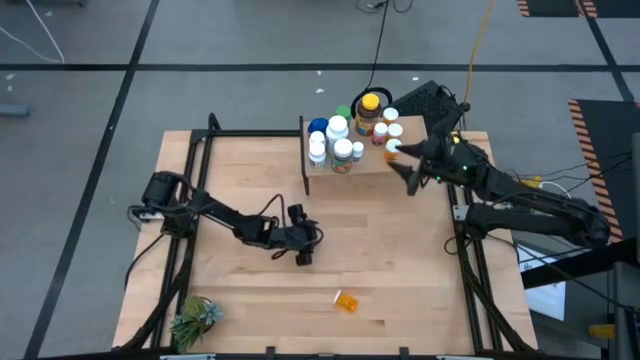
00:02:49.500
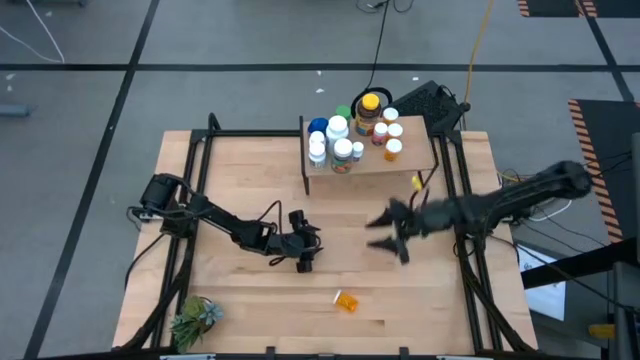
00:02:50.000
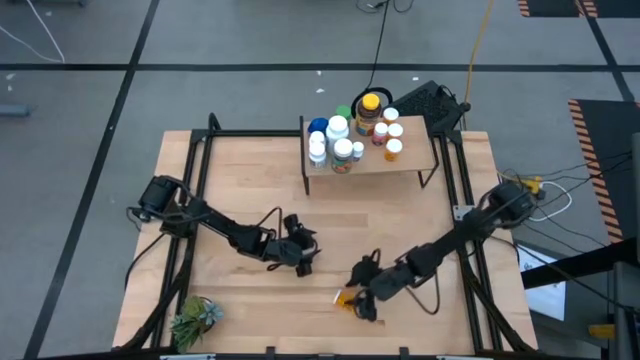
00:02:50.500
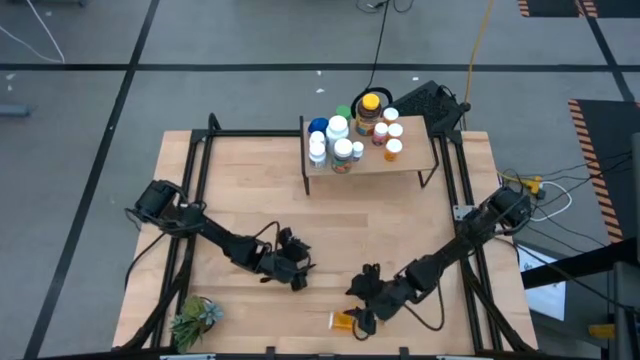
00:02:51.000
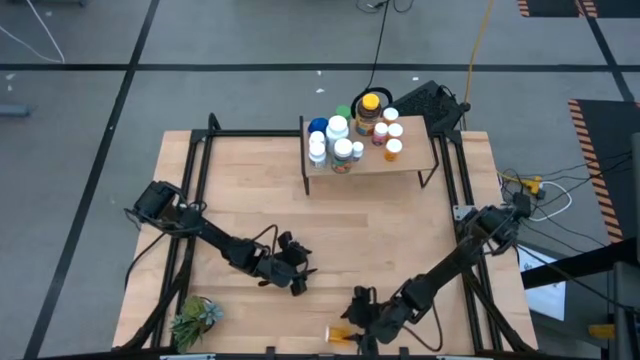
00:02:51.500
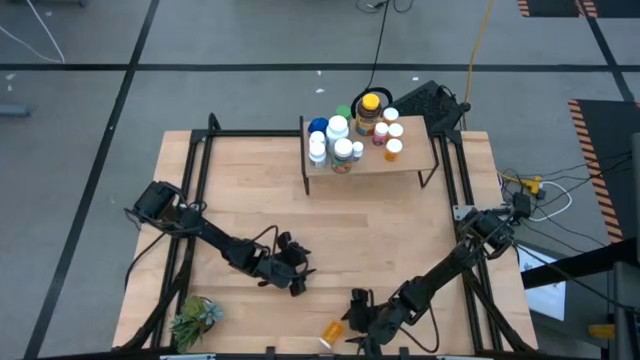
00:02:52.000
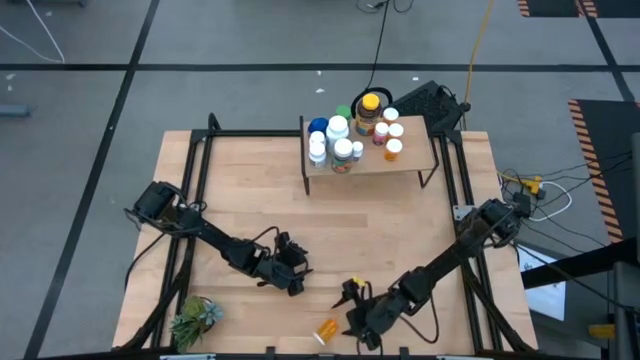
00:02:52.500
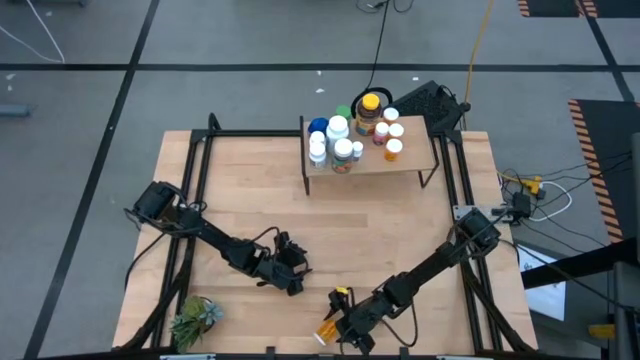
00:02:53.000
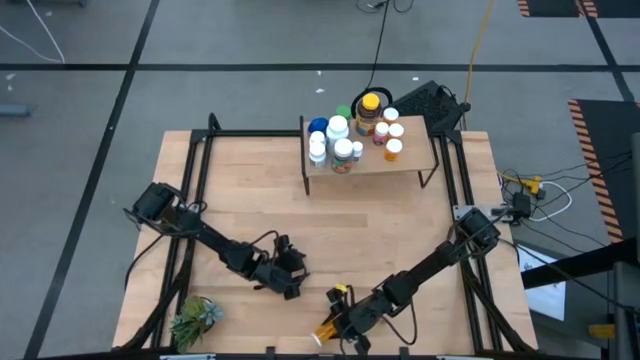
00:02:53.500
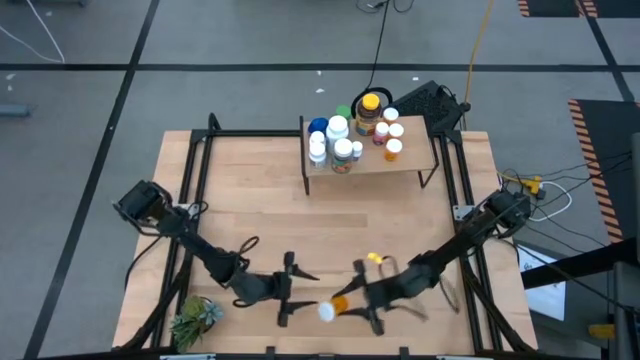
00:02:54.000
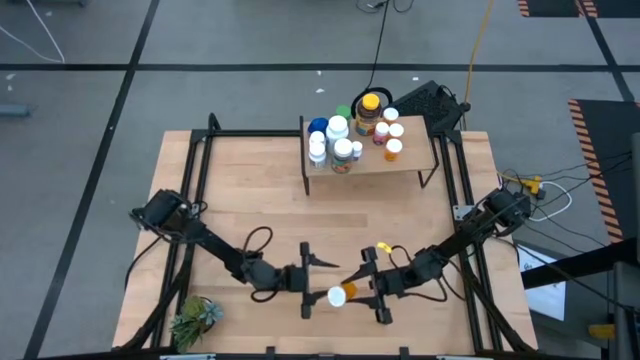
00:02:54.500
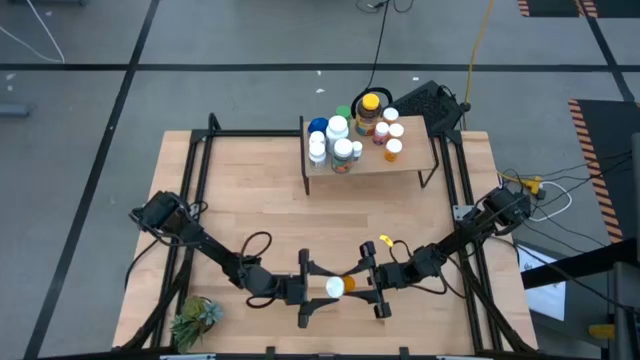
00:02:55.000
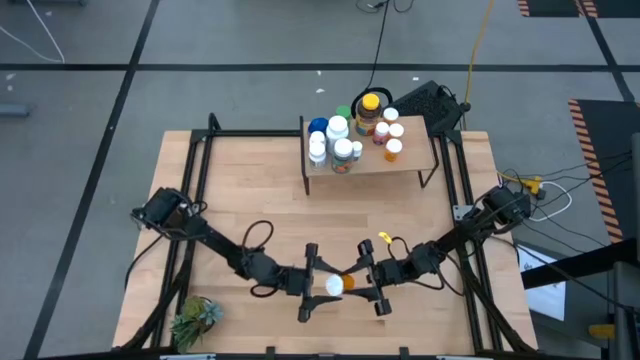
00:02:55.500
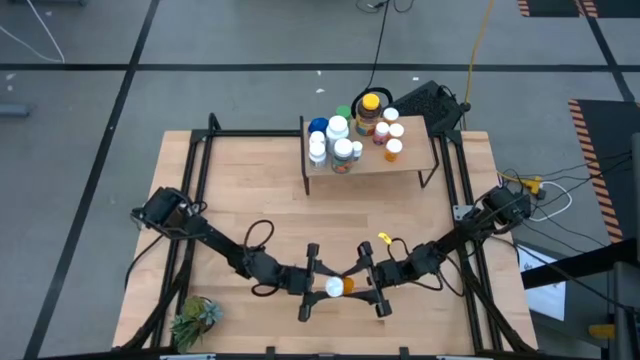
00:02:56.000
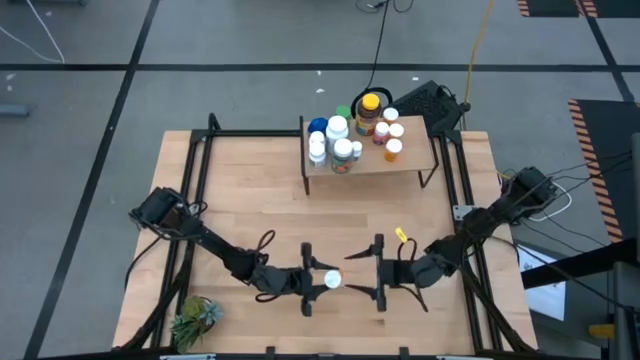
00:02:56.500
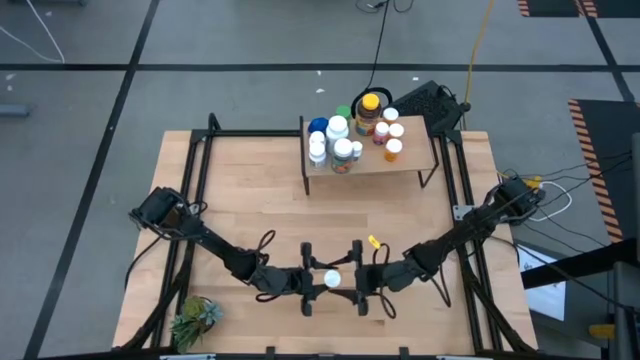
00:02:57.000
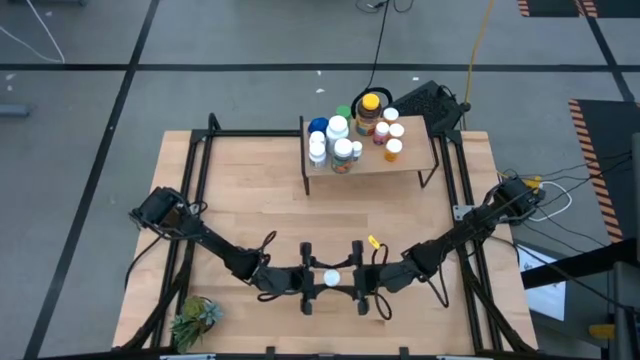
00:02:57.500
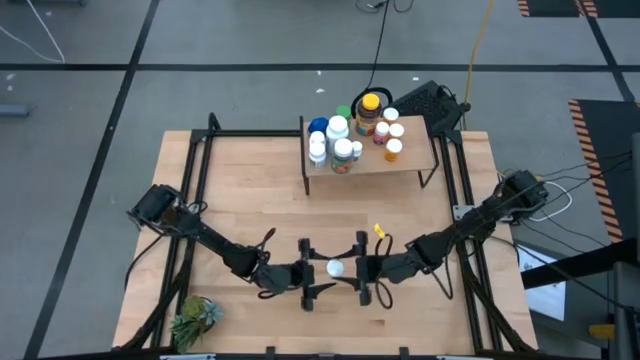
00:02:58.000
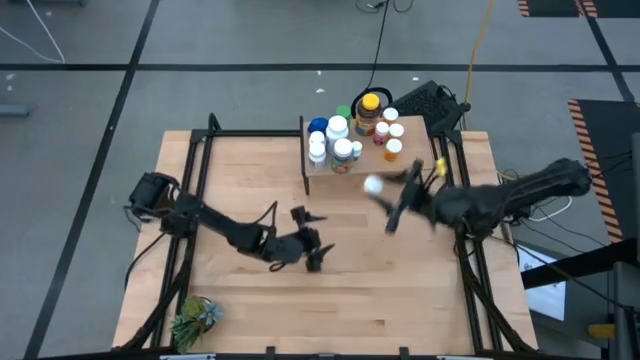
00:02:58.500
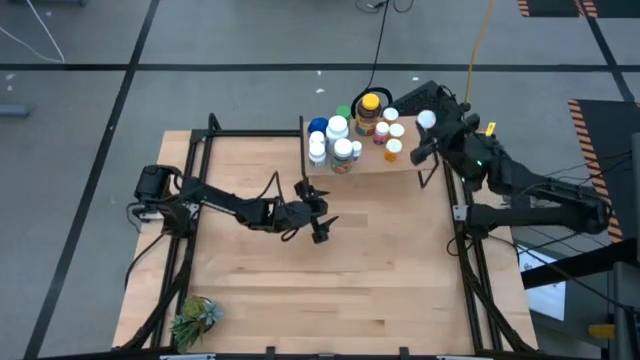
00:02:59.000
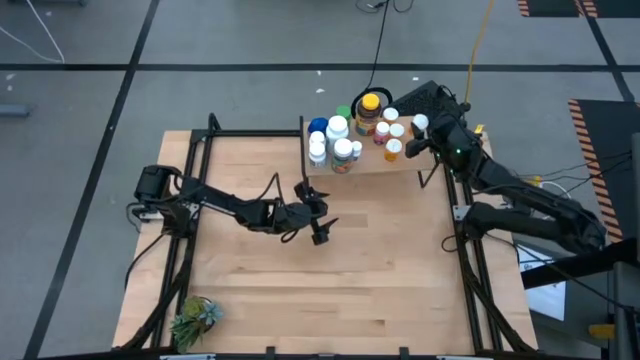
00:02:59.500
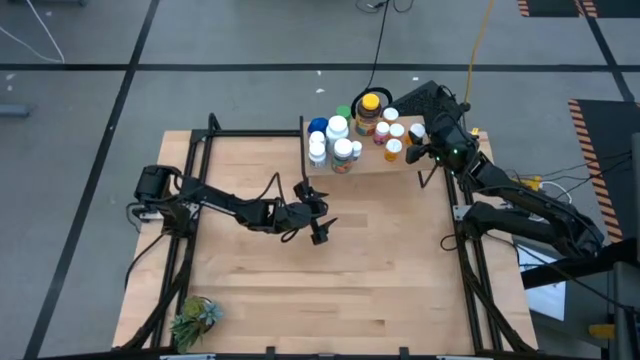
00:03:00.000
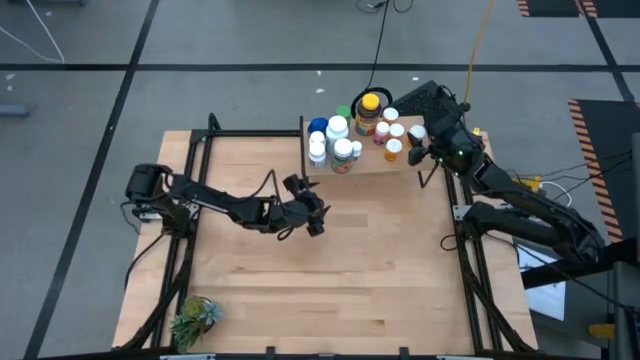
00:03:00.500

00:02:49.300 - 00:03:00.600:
Task: Pick and place medicine bottles onto shelf by color
Put the orange bottle on the shelf

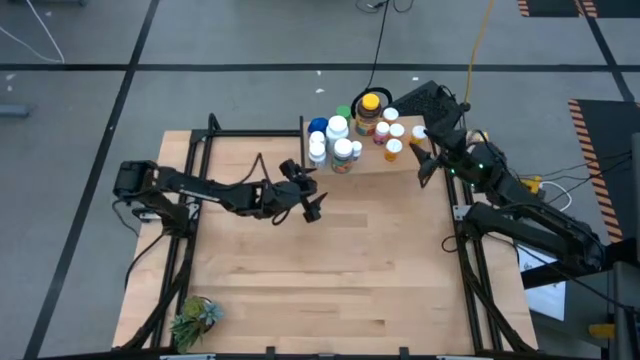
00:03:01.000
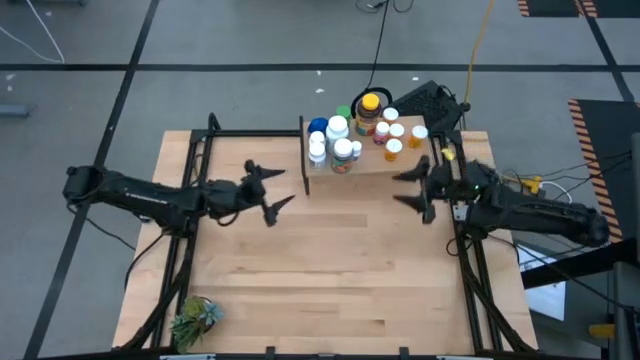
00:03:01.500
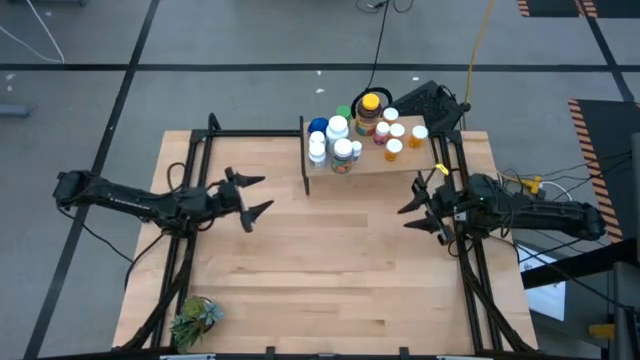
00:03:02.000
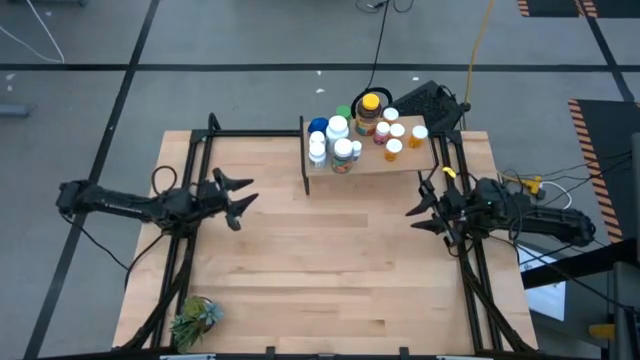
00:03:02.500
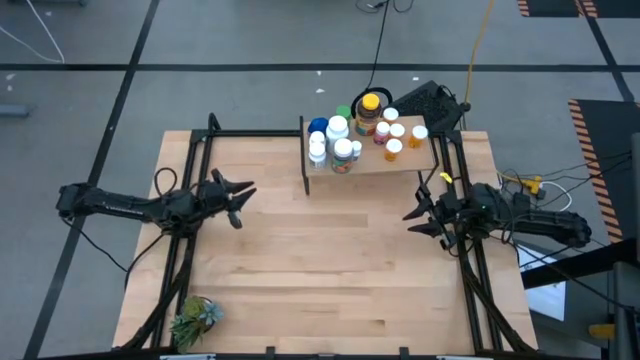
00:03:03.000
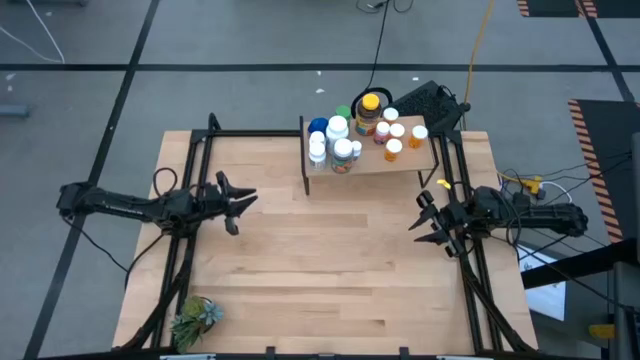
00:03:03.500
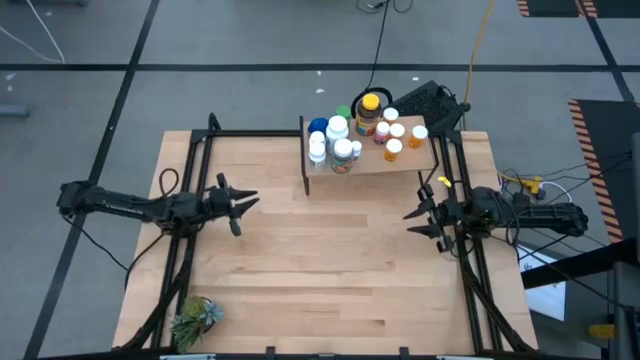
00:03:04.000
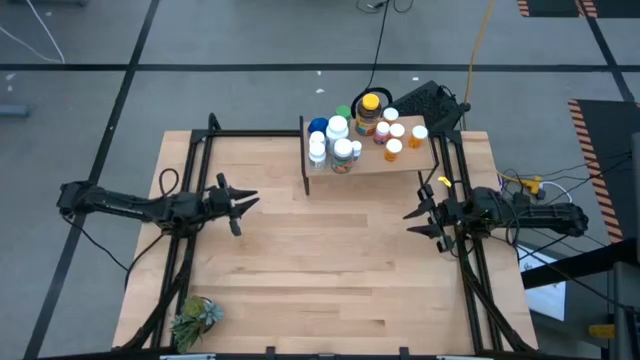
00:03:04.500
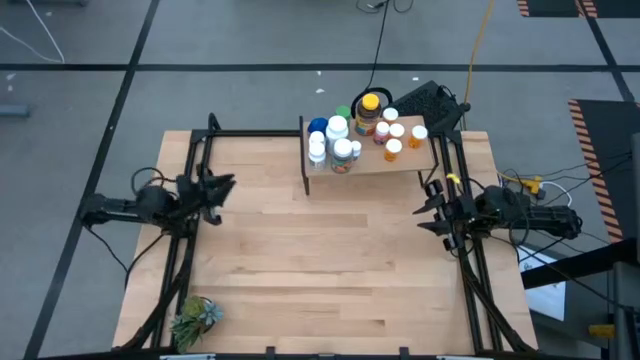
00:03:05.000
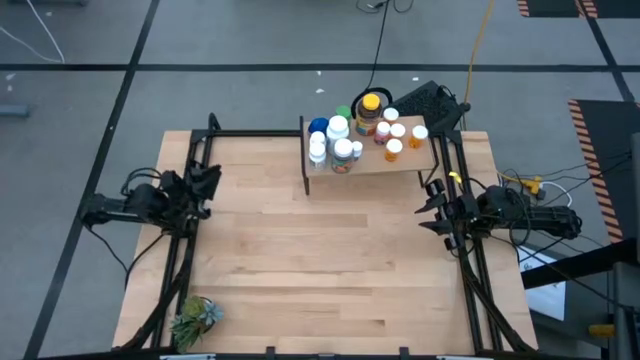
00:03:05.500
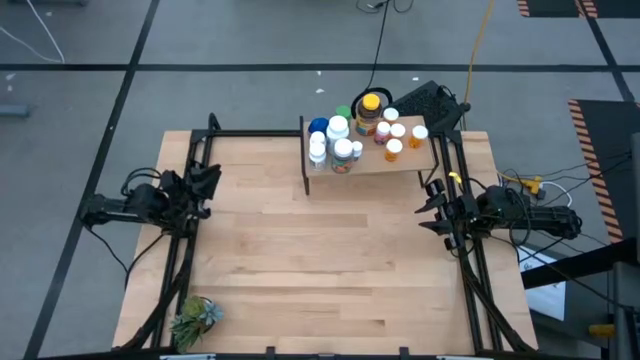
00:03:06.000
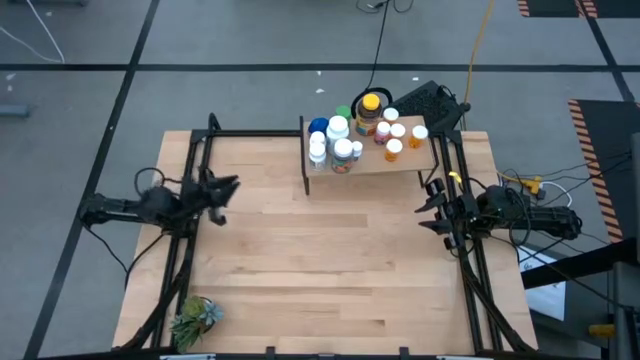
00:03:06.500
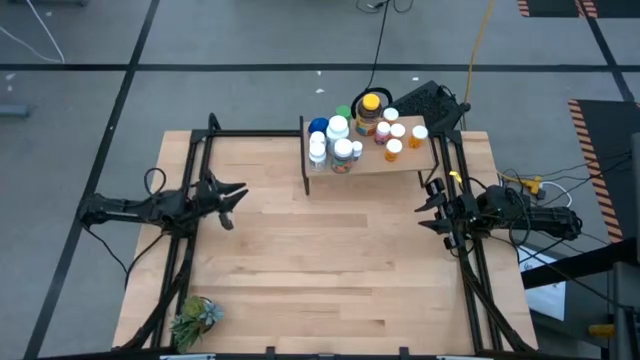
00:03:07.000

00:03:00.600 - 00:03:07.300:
Return to Home Position

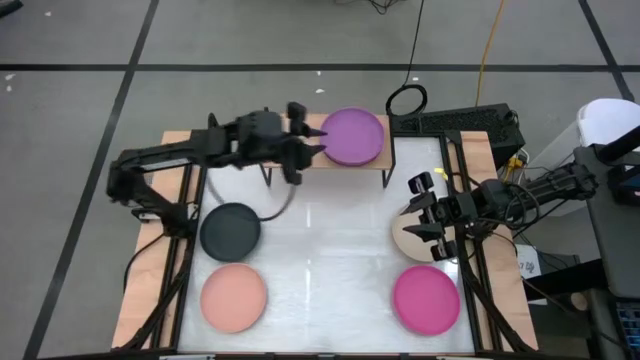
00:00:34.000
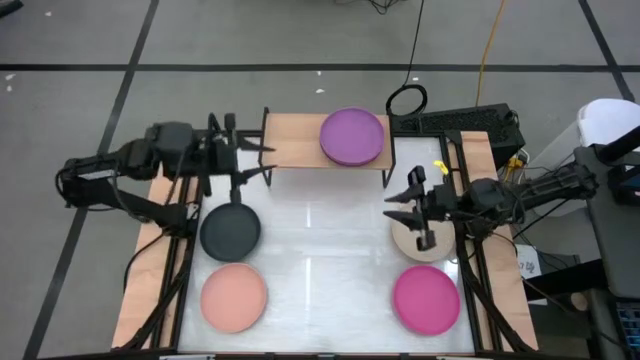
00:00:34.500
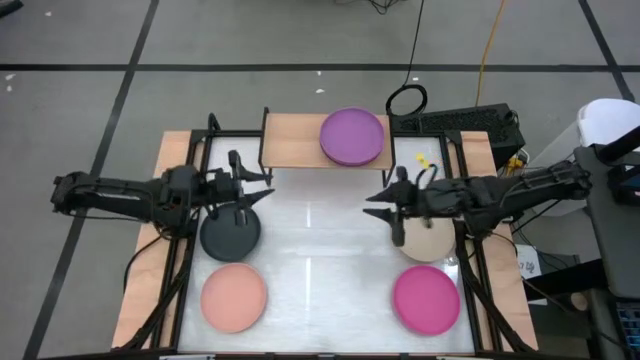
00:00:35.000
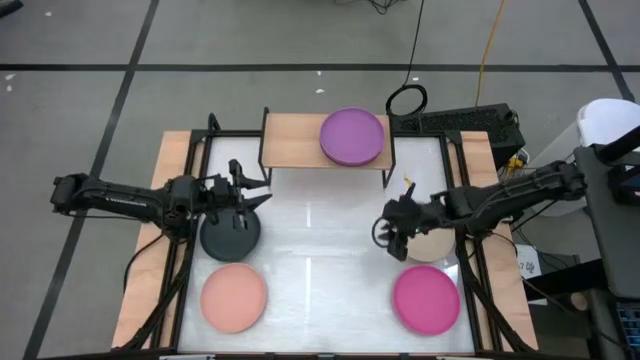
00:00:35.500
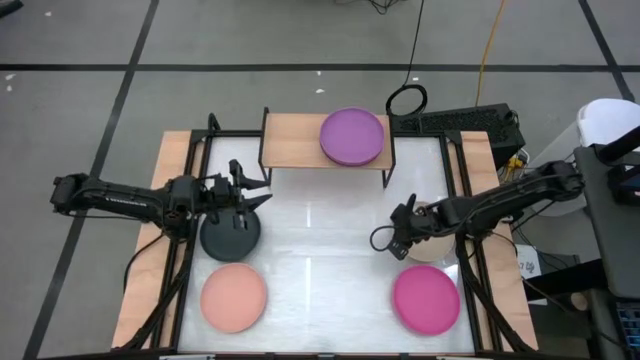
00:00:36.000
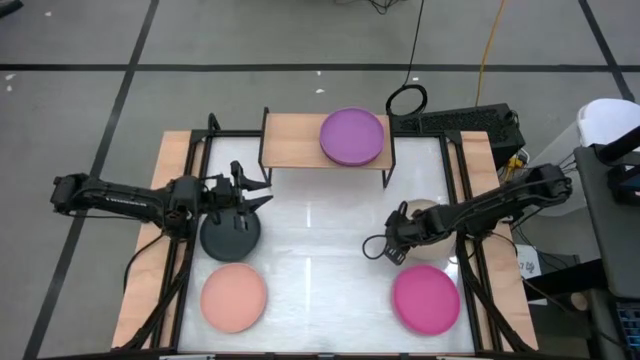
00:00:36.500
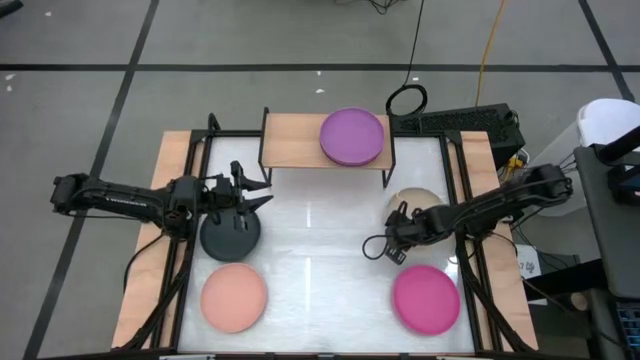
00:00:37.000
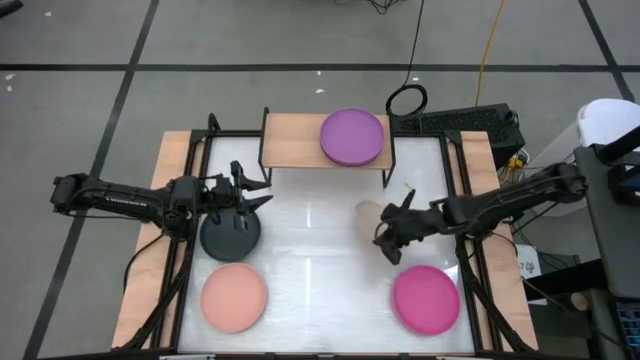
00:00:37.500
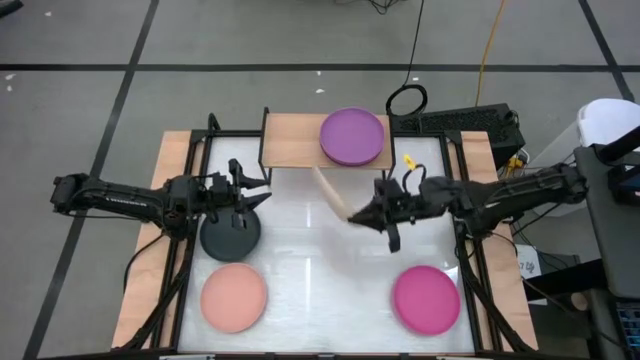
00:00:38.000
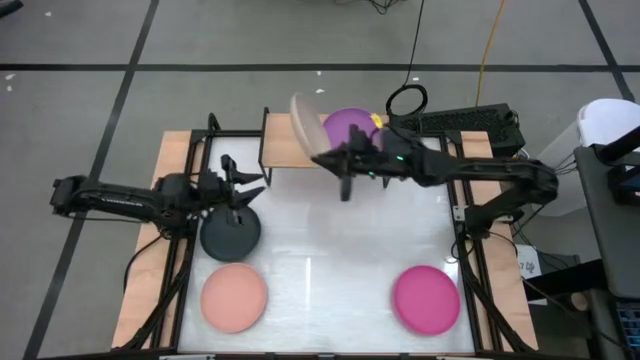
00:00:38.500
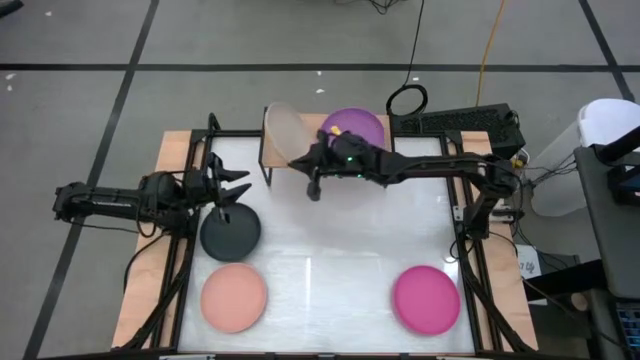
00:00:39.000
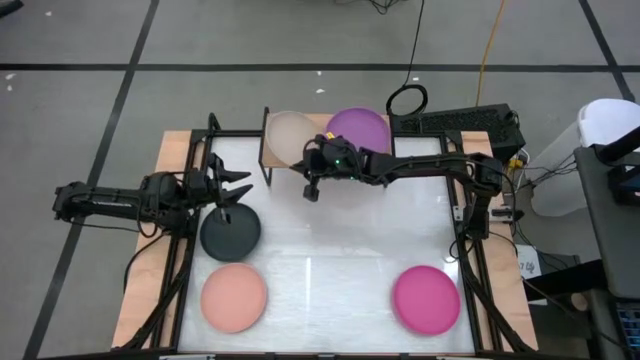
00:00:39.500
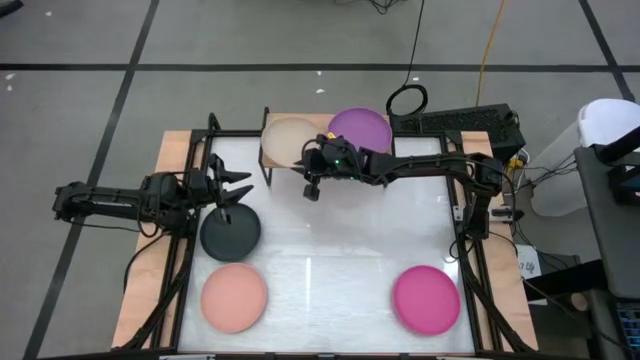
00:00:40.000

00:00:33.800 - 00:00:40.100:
Task: Place and stack plates onto a shelf
Put the light brown plate on the shelf
